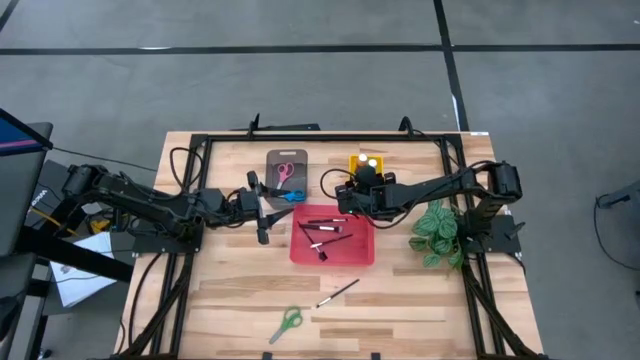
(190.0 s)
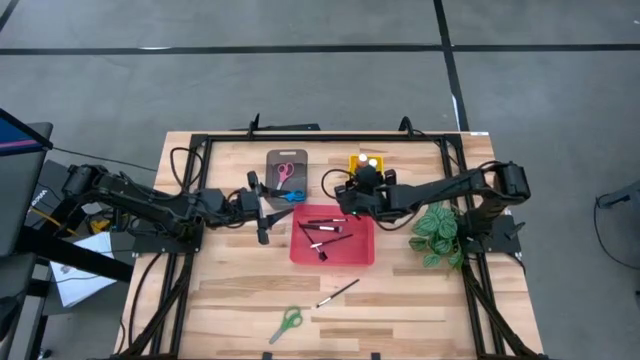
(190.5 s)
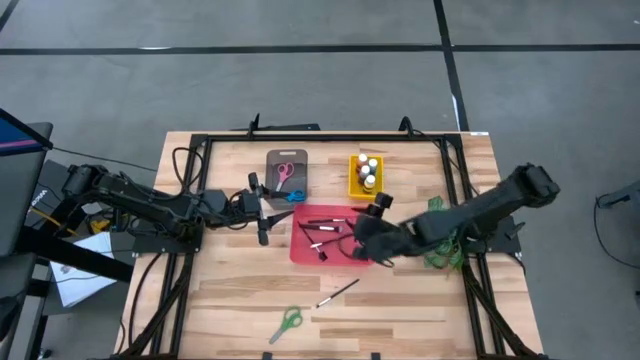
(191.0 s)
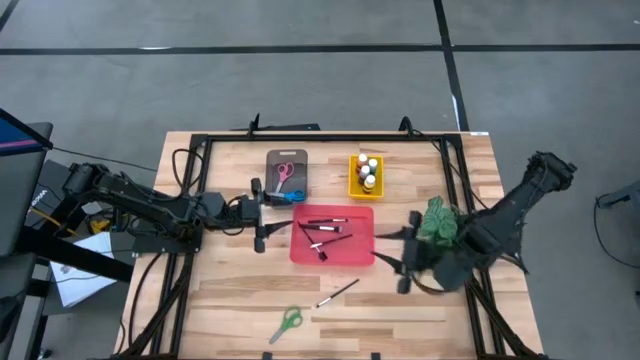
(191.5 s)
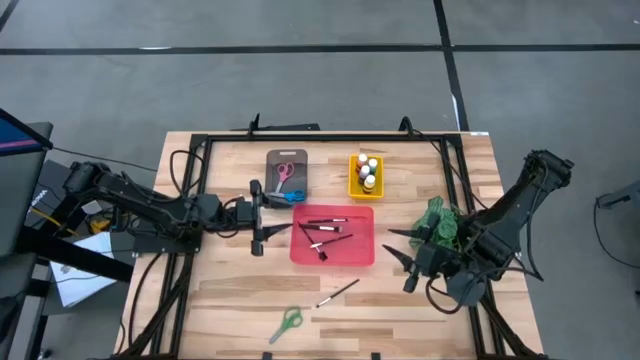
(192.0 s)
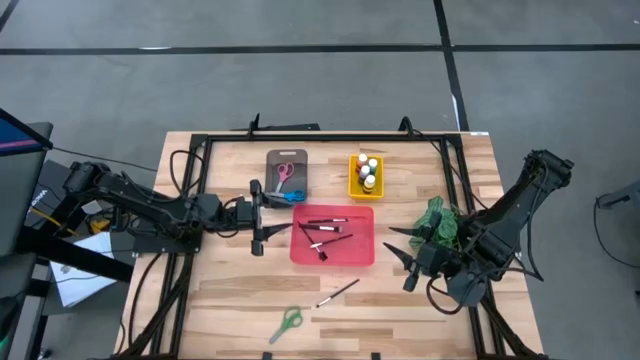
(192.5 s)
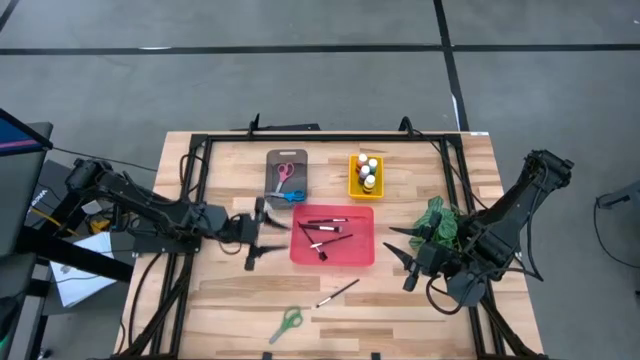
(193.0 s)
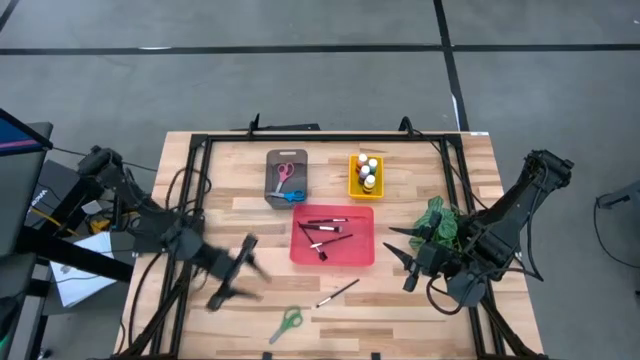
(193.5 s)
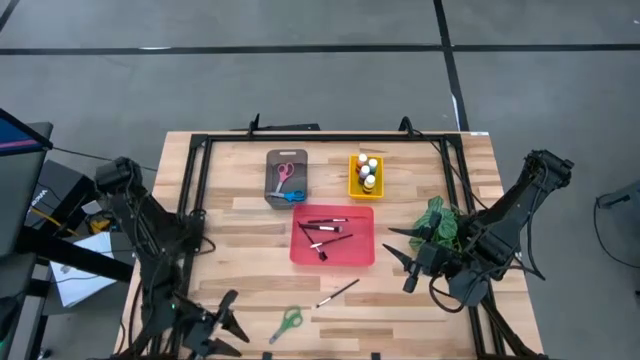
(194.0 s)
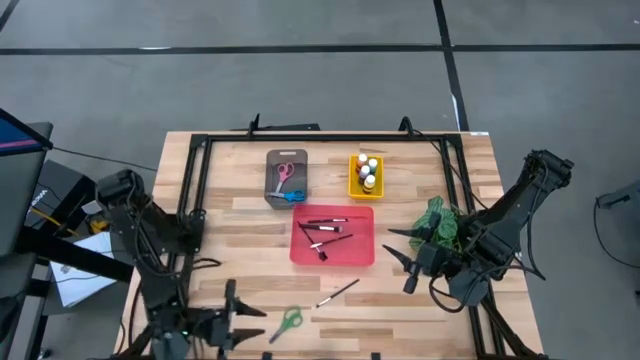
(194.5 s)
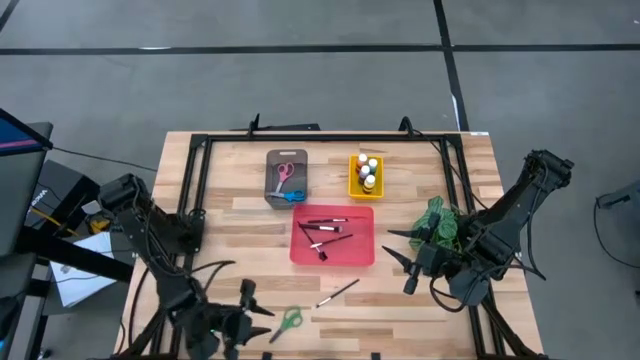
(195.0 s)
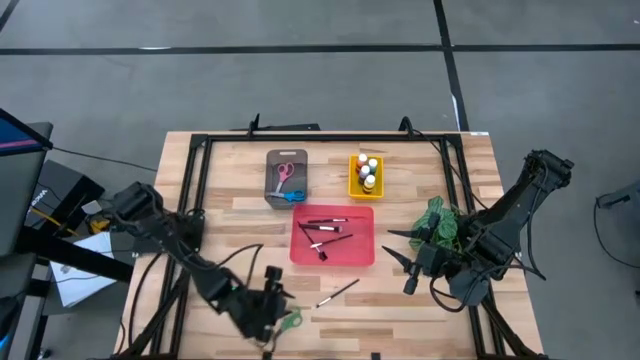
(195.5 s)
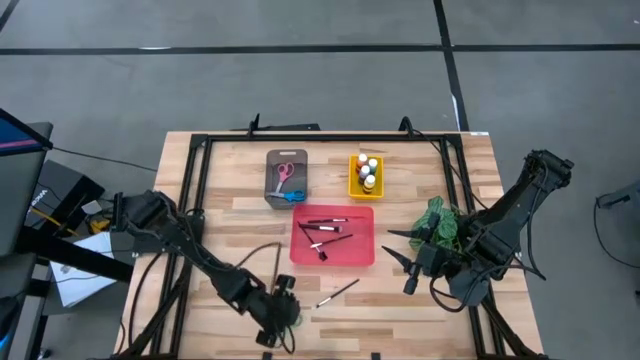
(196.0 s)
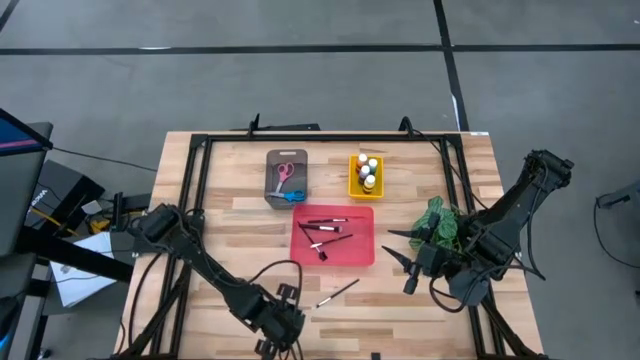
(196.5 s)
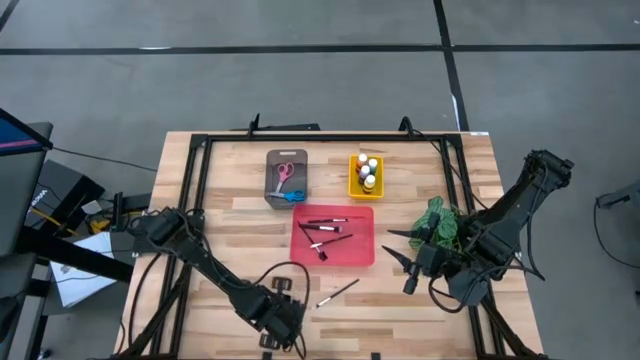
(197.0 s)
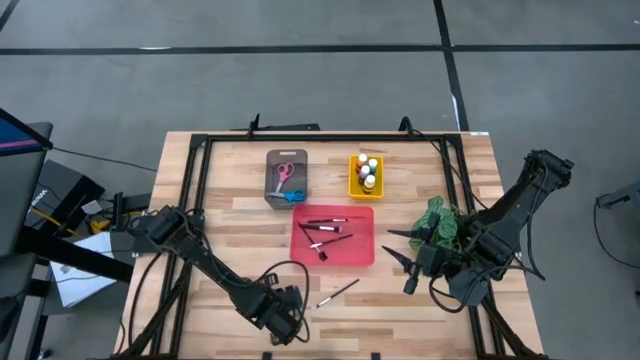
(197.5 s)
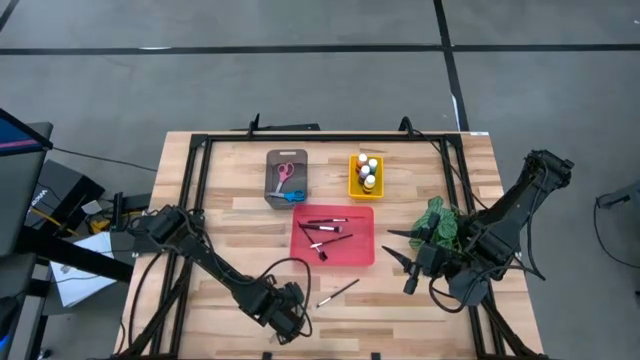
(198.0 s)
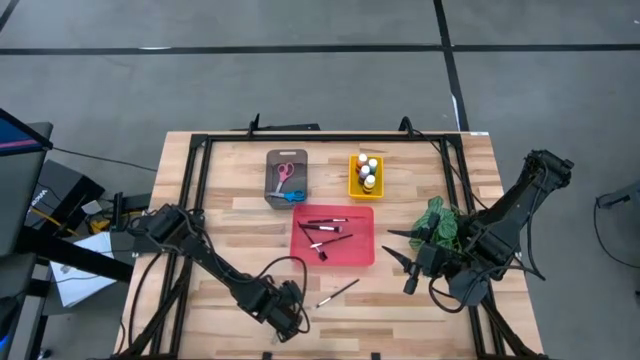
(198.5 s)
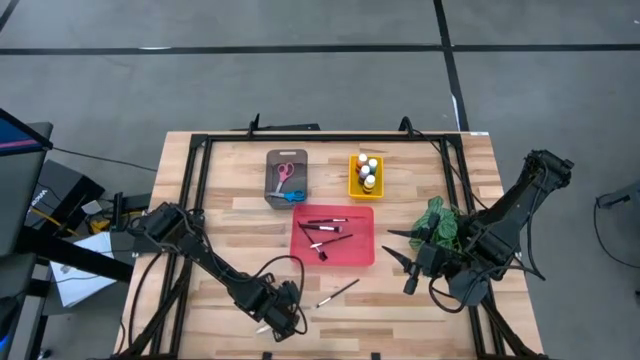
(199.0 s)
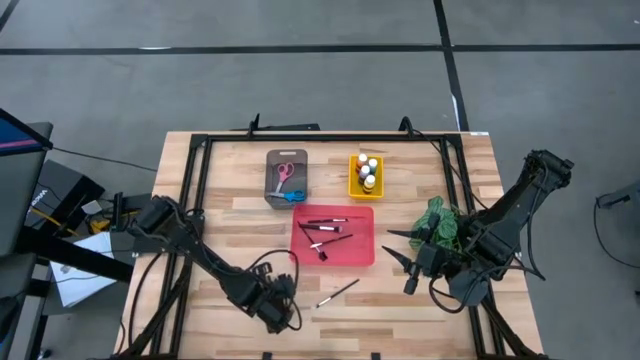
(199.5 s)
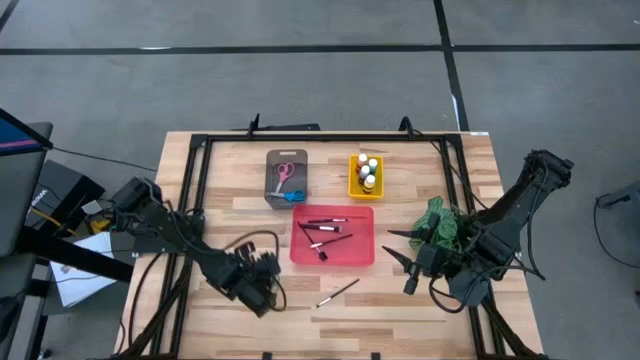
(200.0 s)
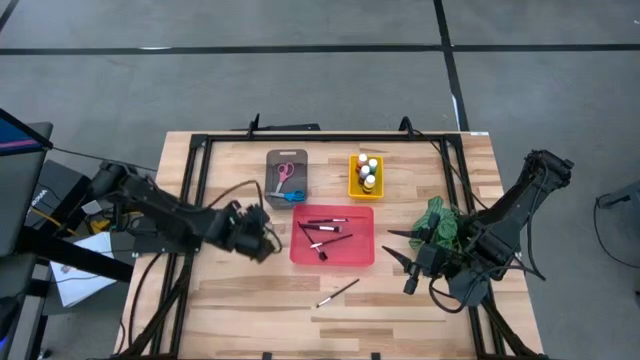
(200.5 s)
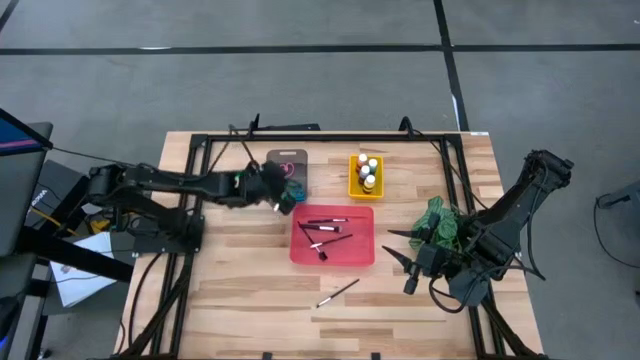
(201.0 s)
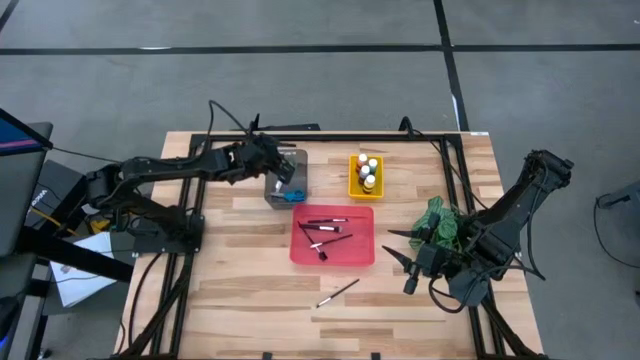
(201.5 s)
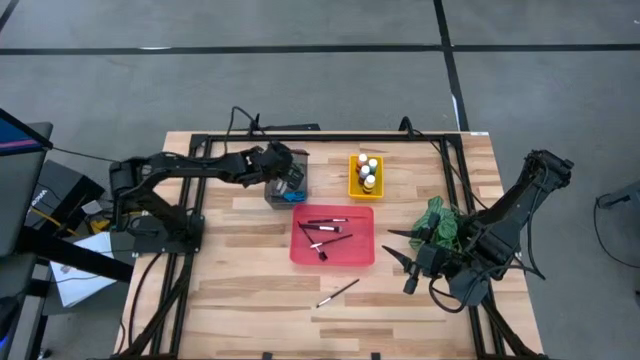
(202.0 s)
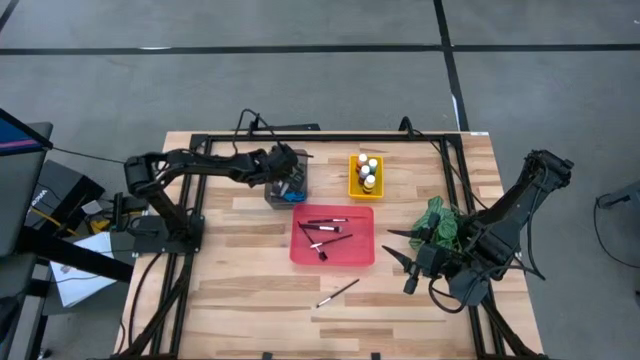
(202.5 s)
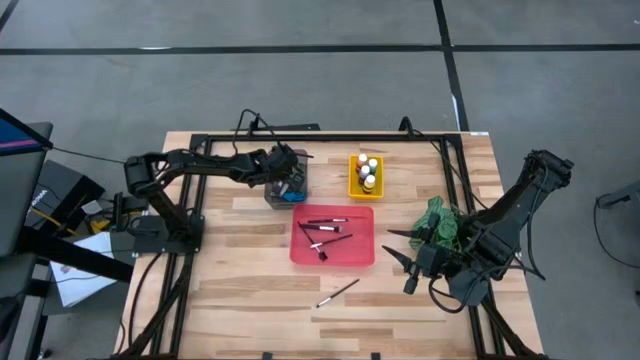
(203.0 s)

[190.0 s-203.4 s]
Task: Pick & Place Paint Supplies
Put the green scissors into the black bin

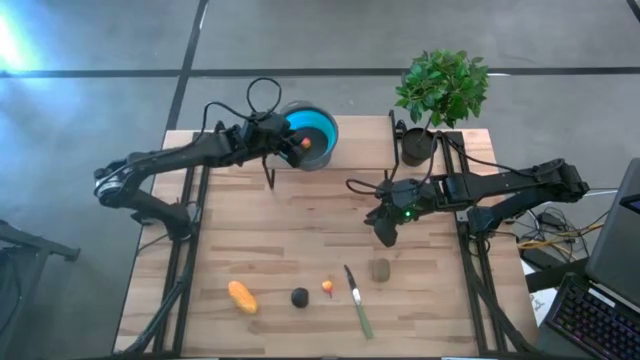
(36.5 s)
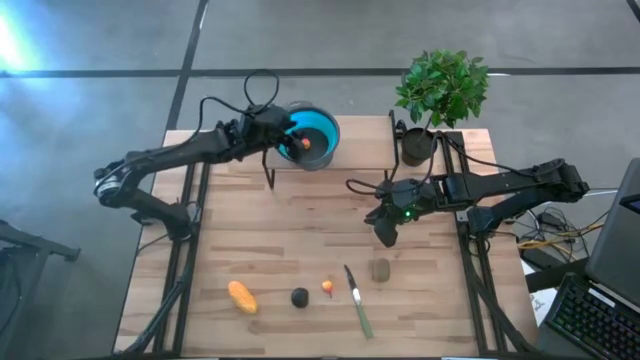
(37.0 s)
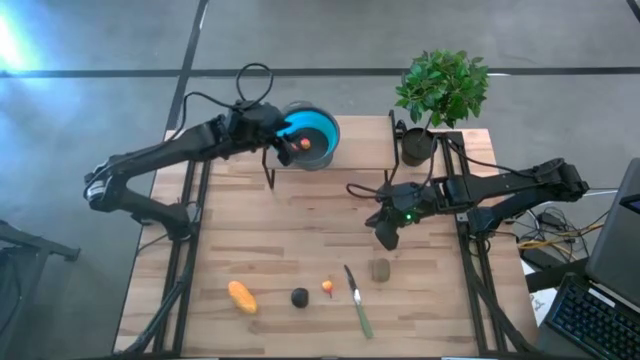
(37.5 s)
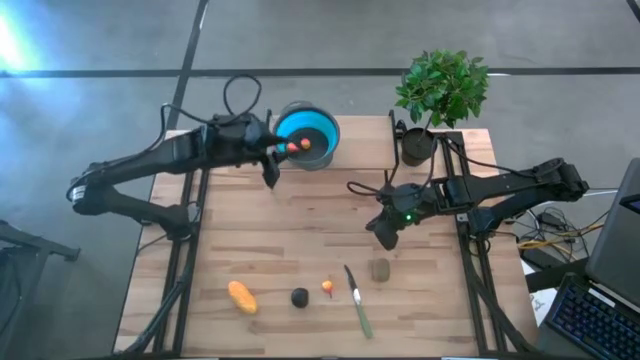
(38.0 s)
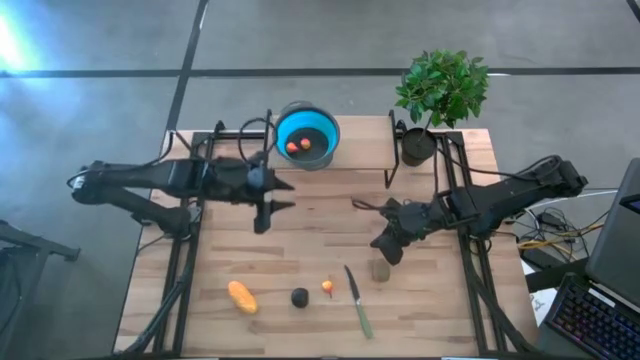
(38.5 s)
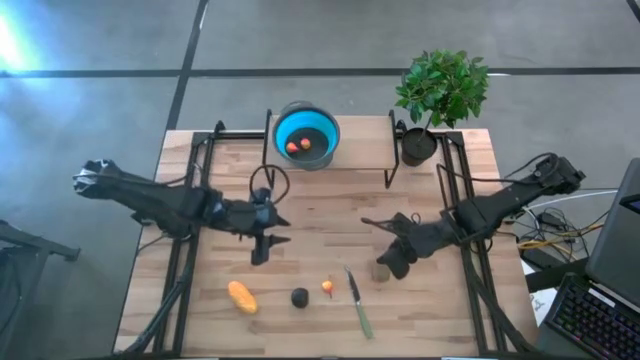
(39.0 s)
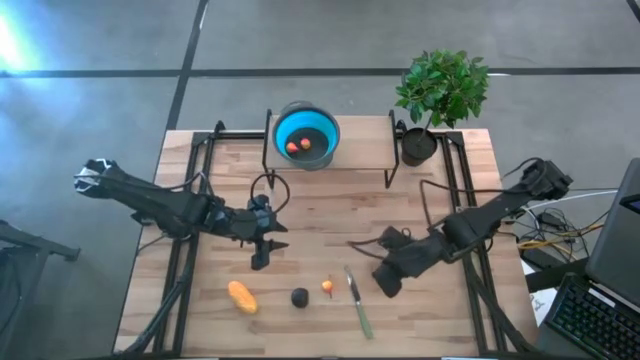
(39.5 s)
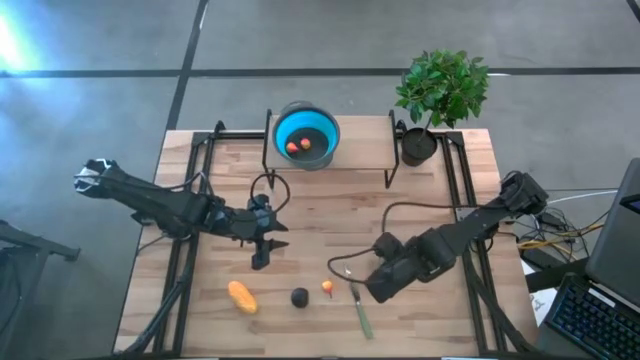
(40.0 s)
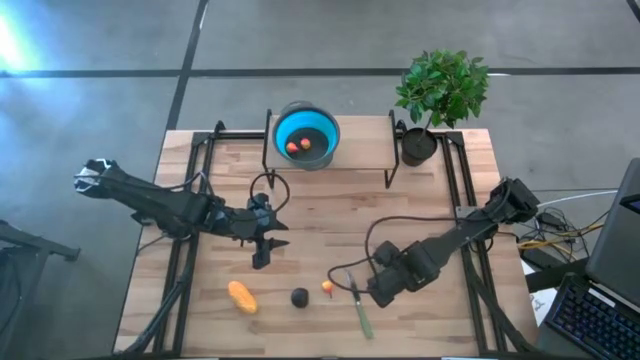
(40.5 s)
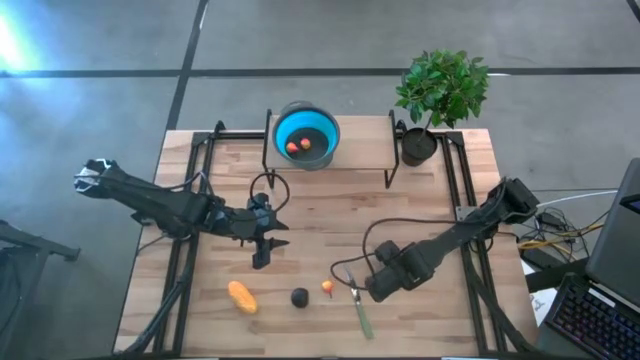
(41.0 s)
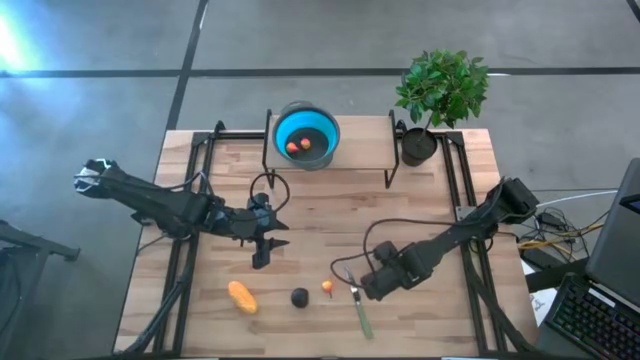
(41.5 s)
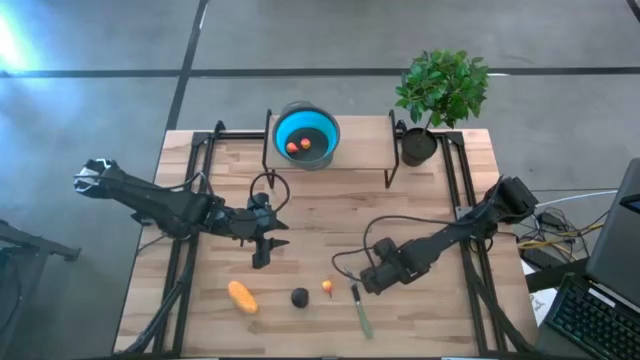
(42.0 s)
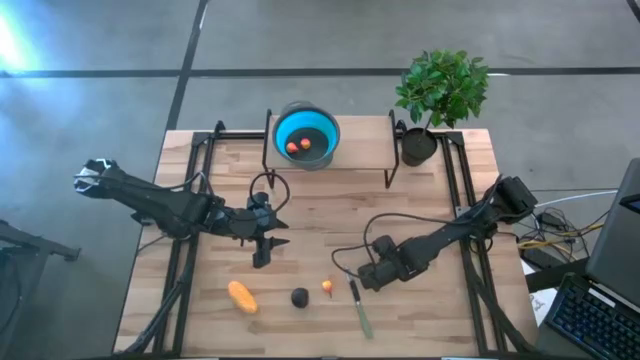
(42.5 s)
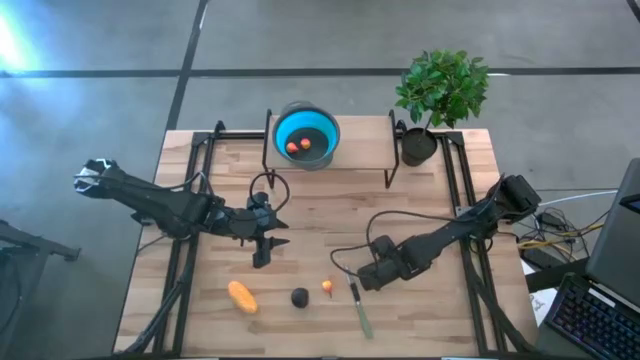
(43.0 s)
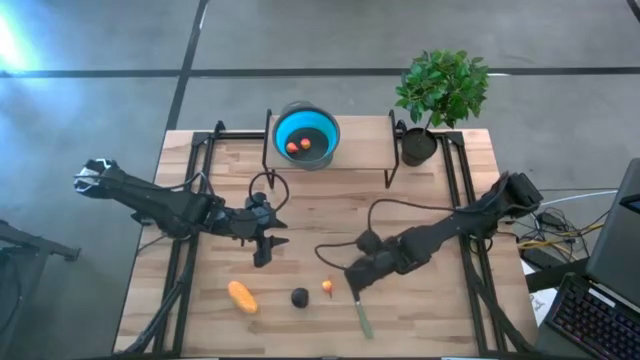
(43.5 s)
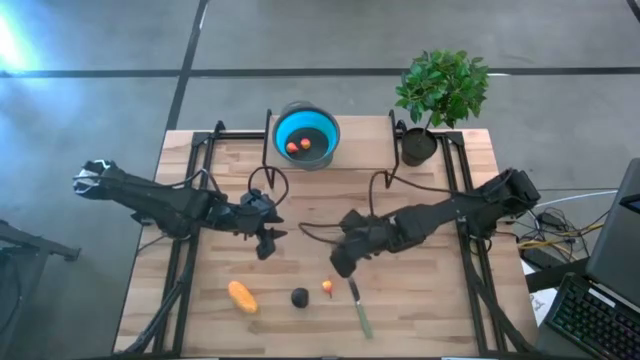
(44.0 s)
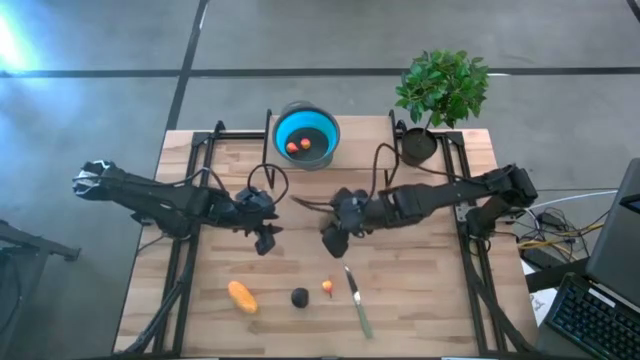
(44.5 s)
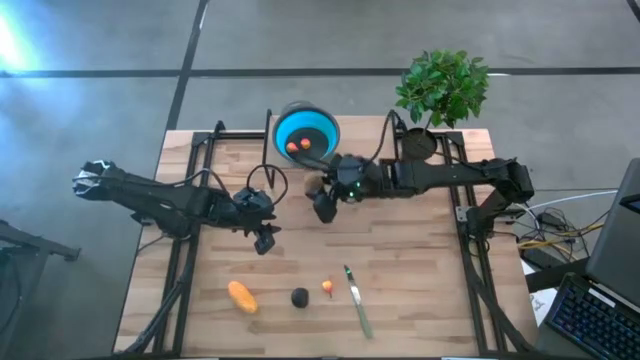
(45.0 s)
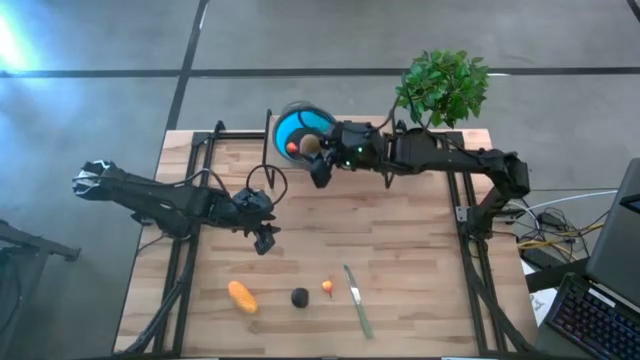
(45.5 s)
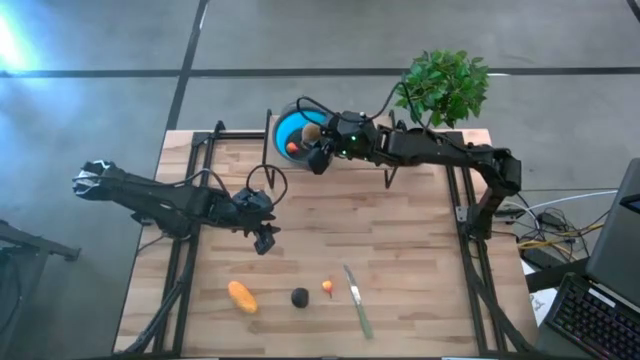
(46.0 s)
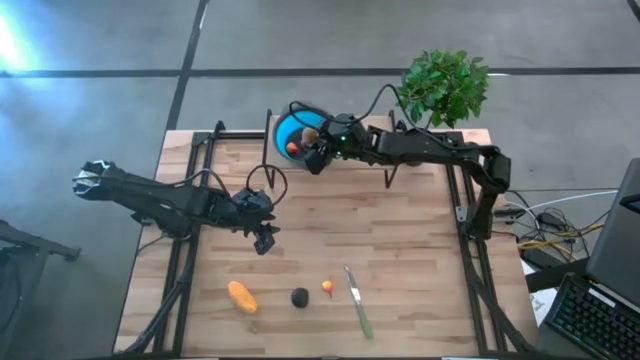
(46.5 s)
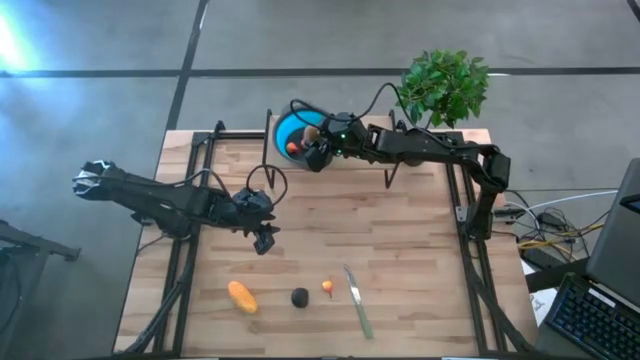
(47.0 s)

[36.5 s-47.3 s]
Task: Pick & Place Fruit
Put the brown kiwi into the blue strainer bowl
